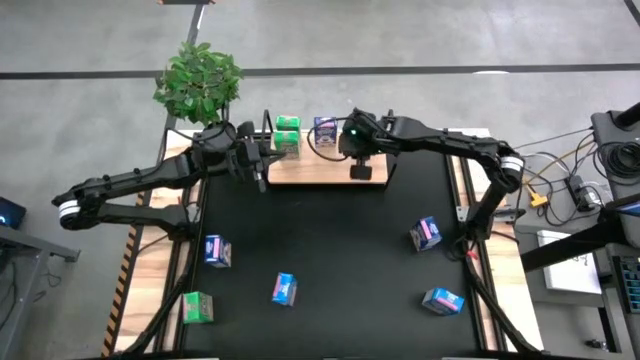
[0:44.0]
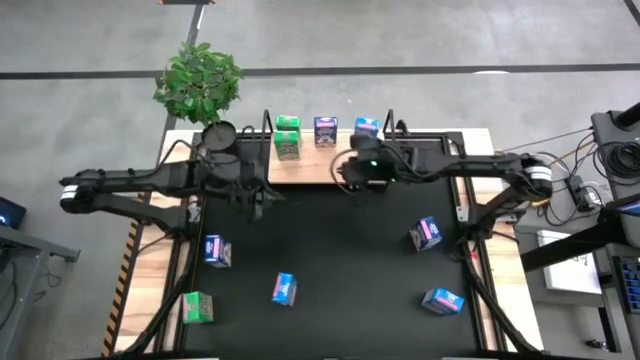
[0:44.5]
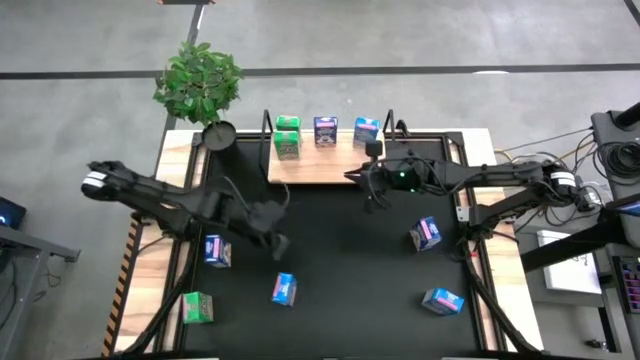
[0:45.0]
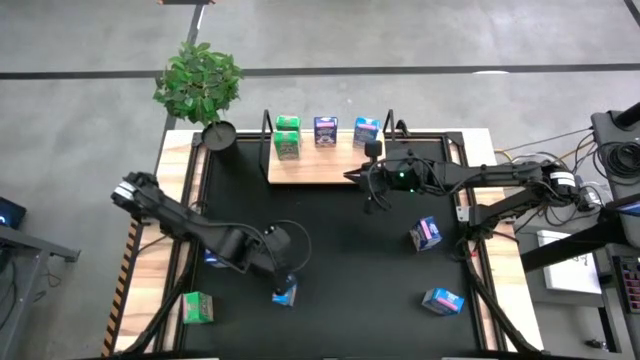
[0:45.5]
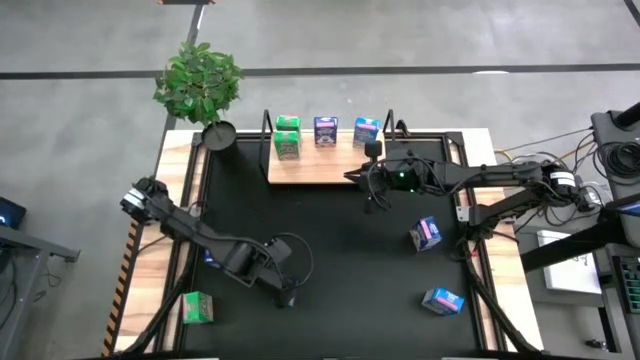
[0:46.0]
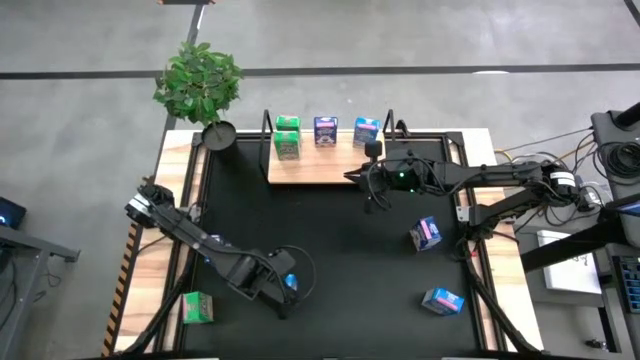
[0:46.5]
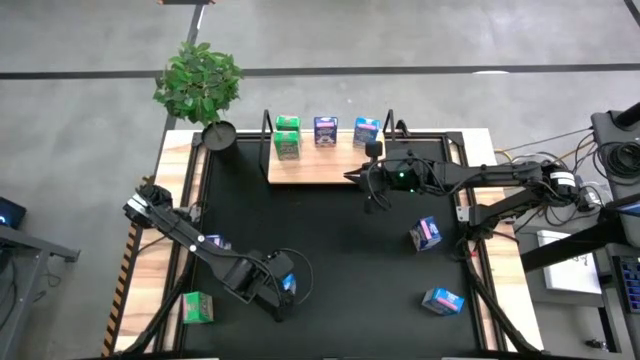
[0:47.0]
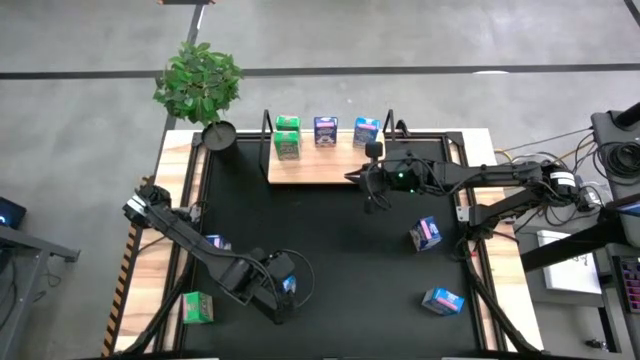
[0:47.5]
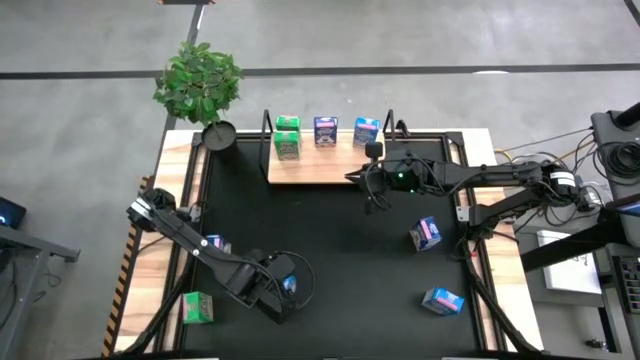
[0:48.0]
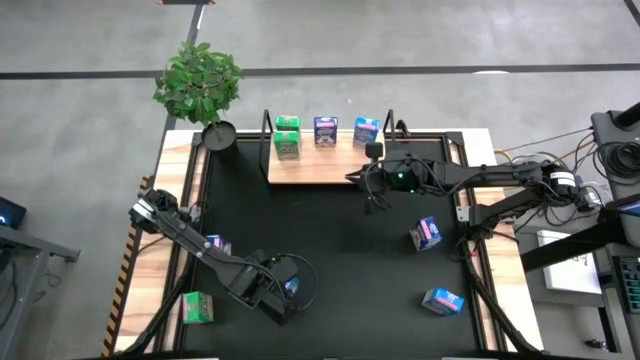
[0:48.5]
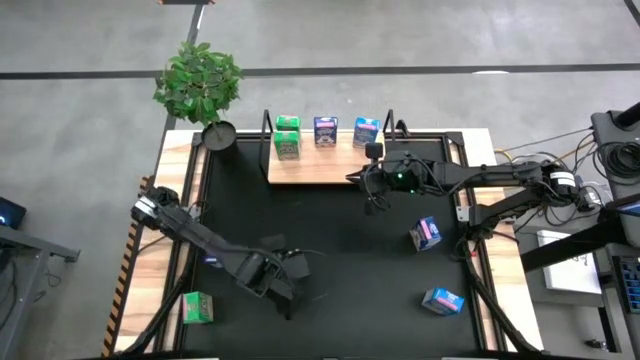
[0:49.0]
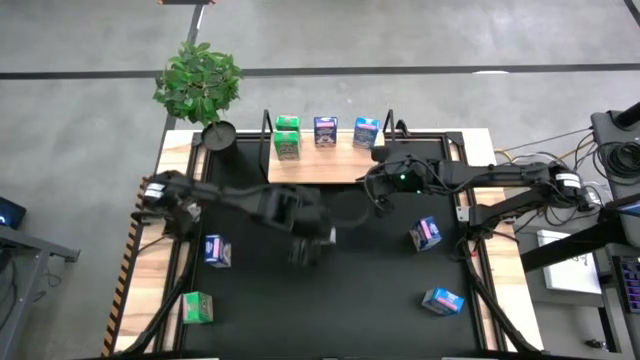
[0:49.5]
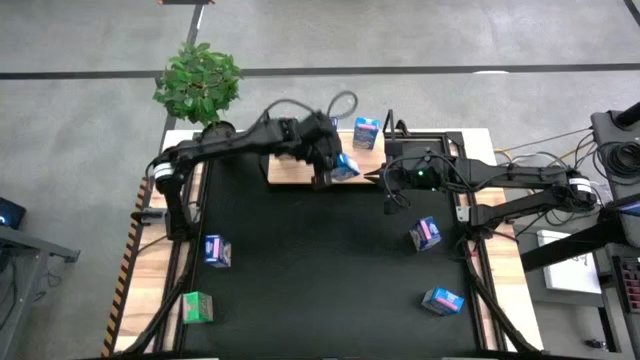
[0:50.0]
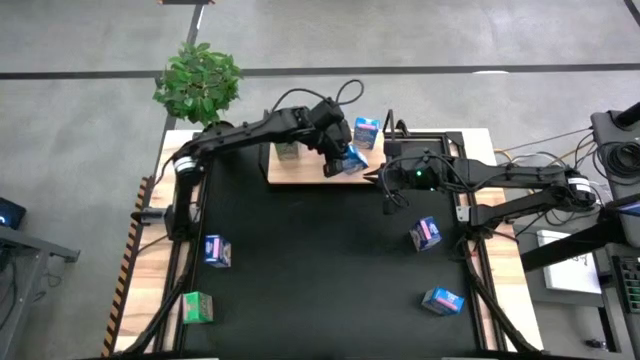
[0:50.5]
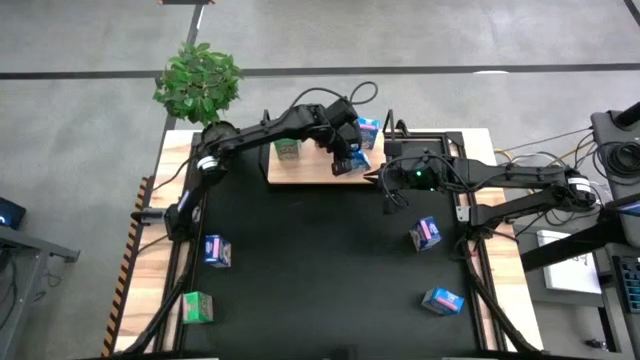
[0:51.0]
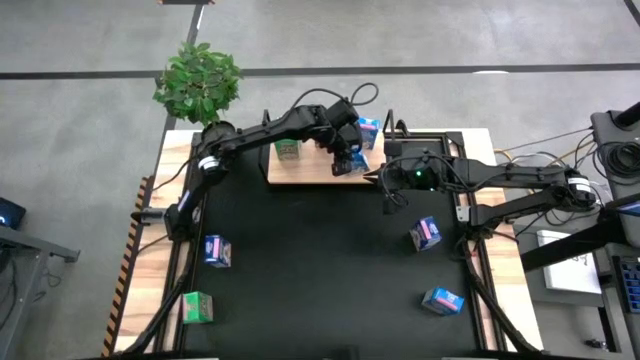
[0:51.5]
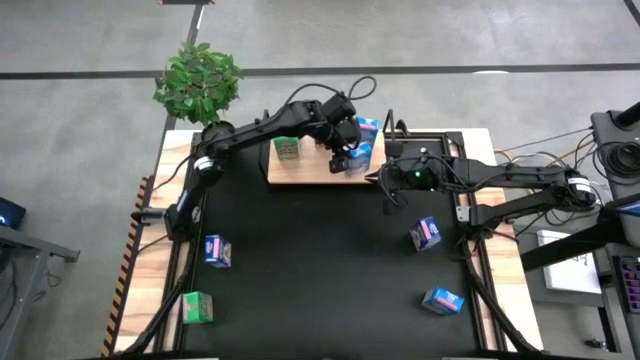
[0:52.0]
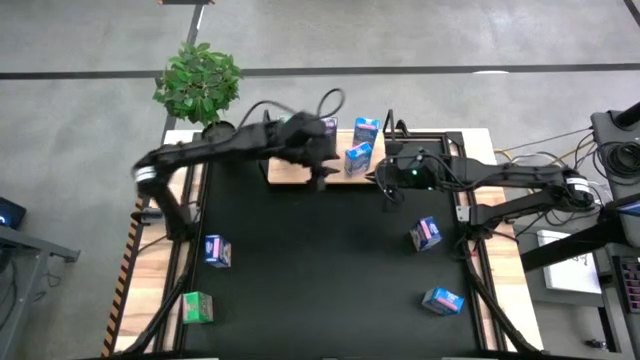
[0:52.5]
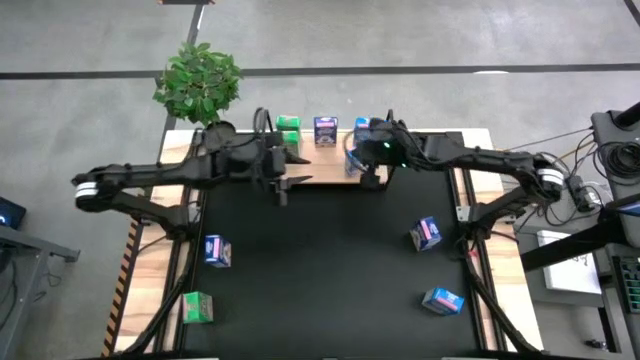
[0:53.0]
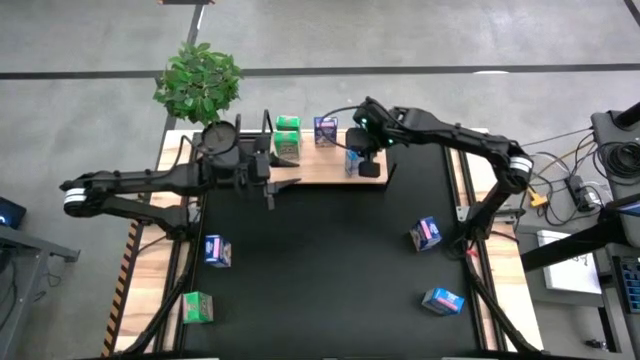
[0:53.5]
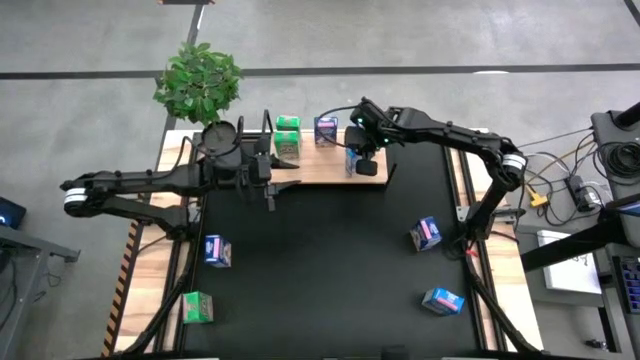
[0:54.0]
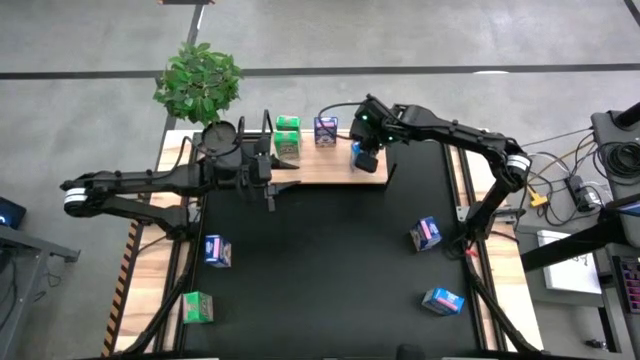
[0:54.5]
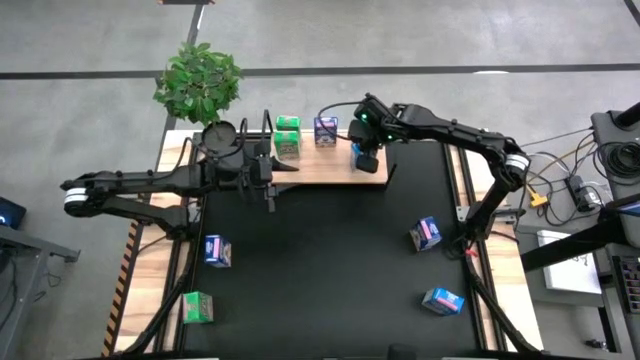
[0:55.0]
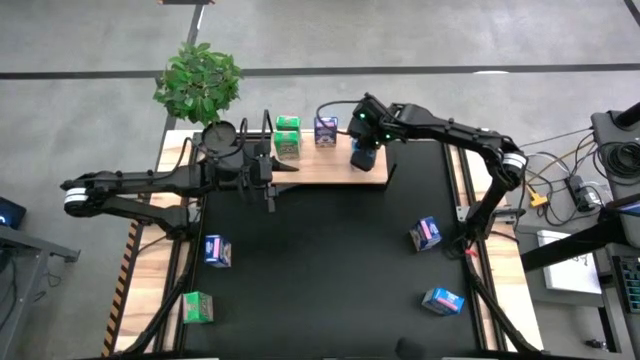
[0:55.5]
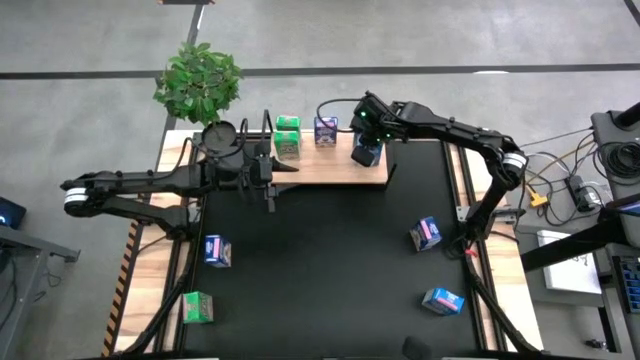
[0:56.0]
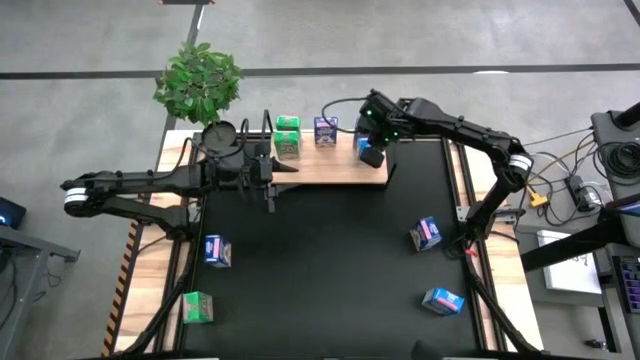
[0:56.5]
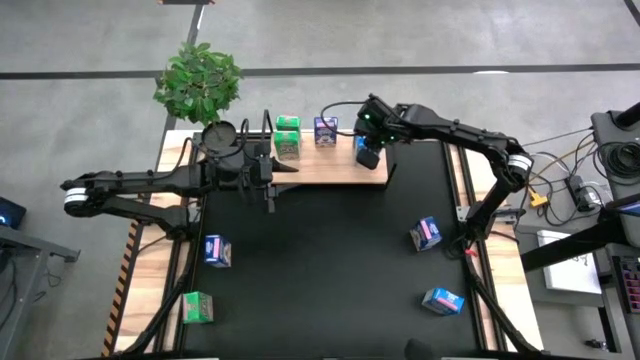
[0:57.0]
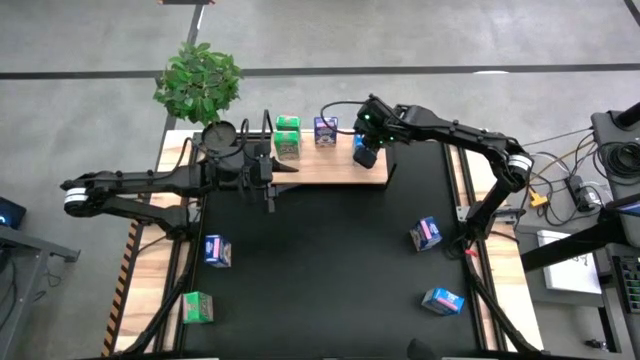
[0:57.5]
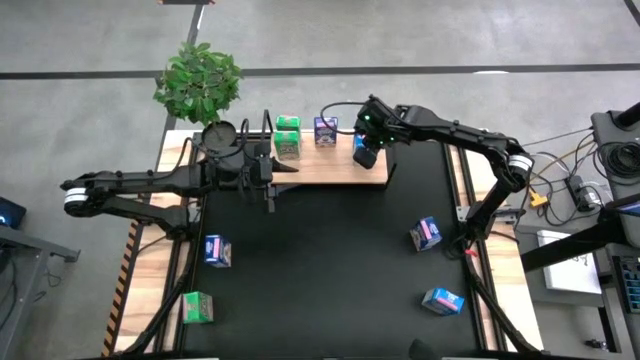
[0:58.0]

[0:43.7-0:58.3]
Task: Stack cereal on shelf
Put the left light blue cereal box aligned with the other light blue cereal box on the shelf

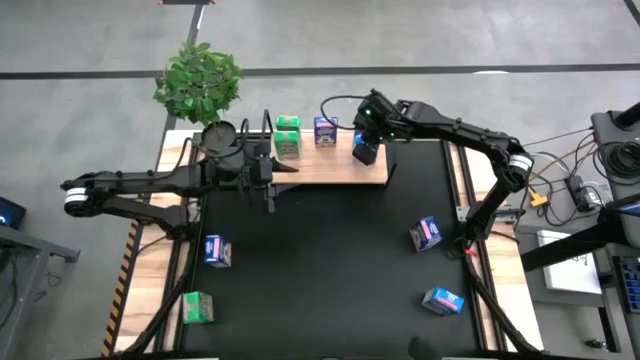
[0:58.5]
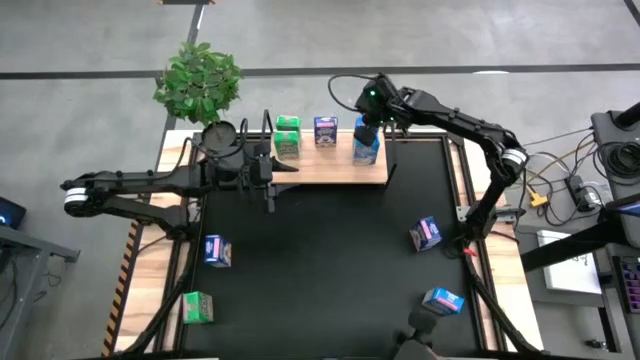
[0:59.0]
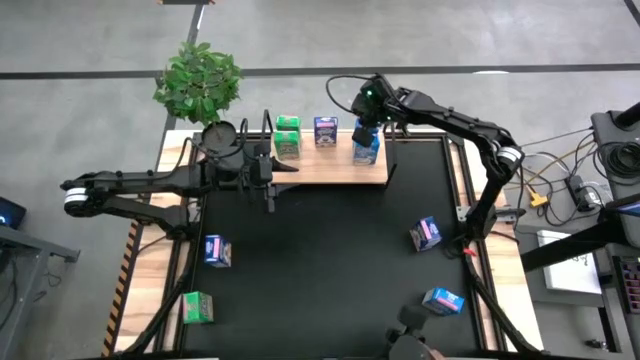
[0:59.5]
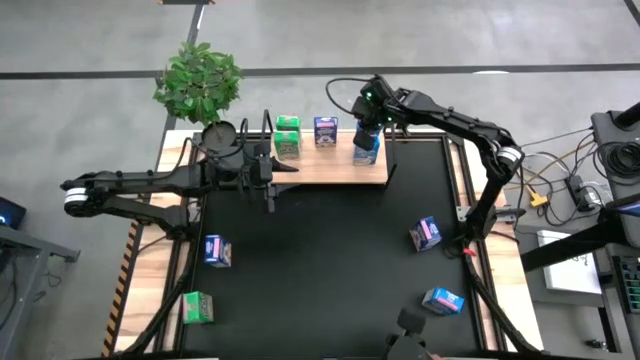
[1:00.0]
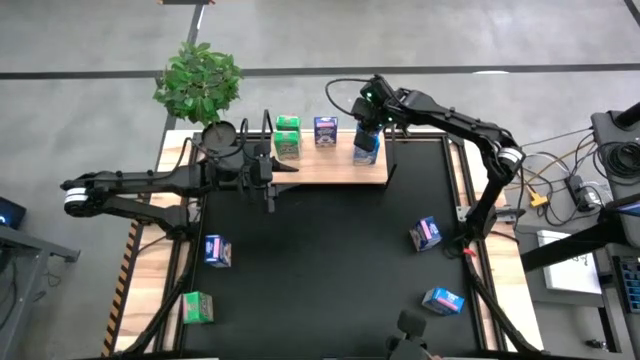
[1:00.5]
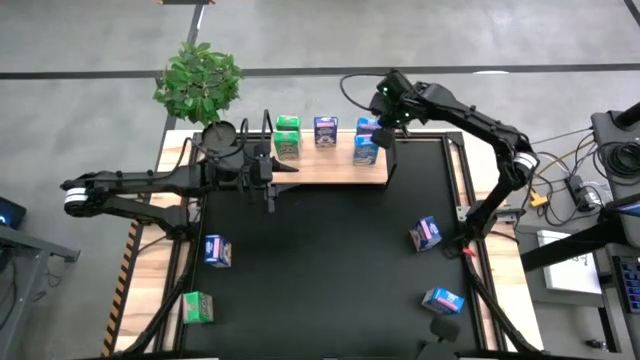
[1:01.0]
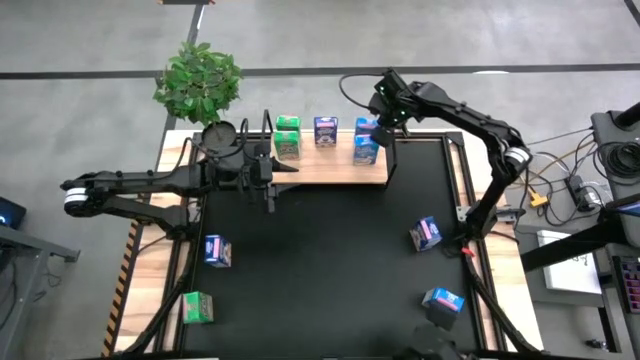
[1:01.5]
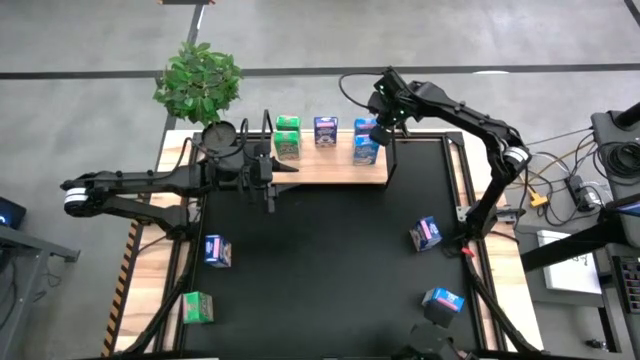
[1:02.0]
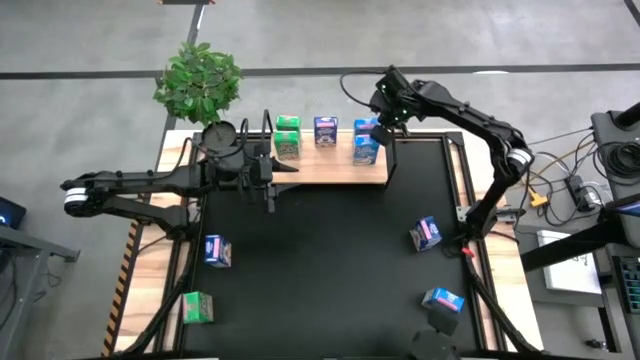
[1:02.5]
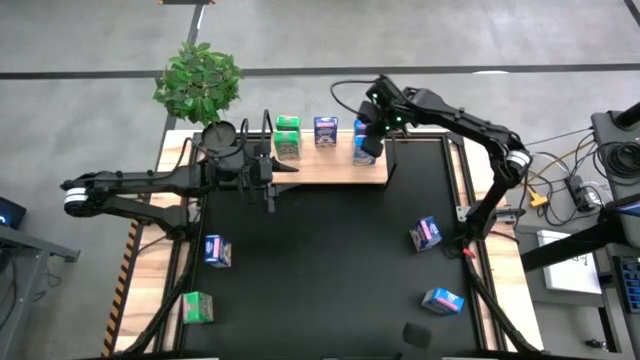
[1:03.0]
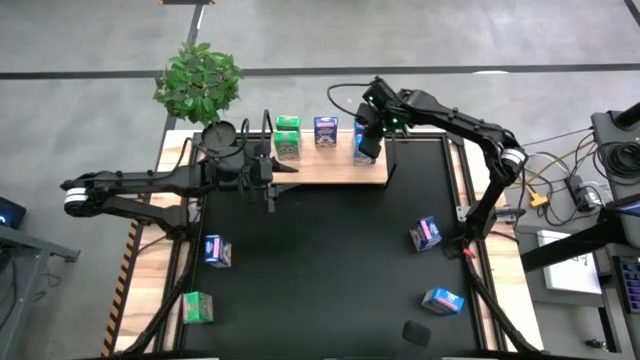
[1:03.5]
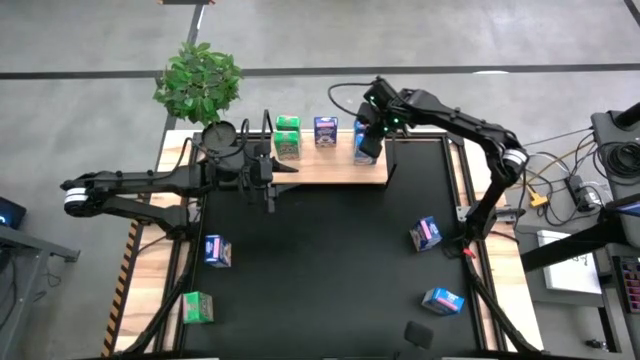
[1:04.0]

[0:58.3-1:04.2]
Adjust the light blue cereal boxes on the shelf
